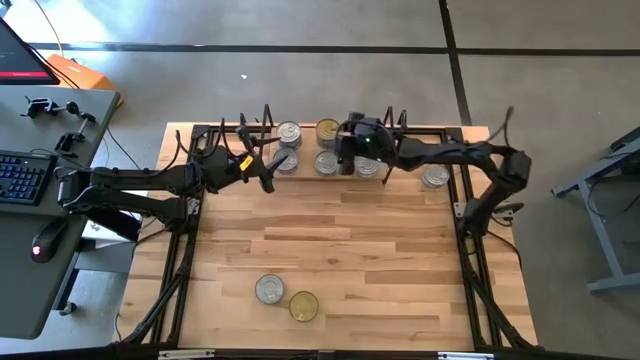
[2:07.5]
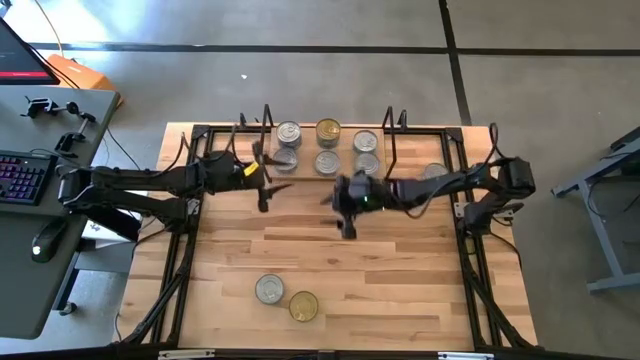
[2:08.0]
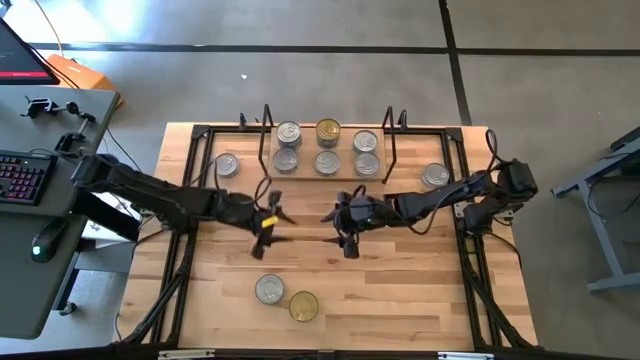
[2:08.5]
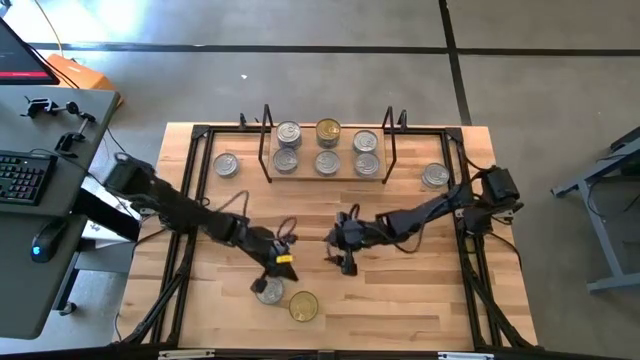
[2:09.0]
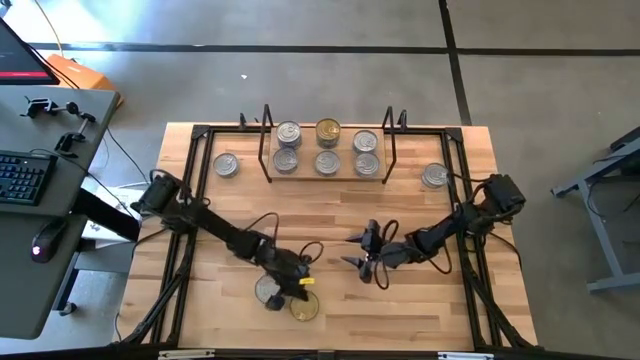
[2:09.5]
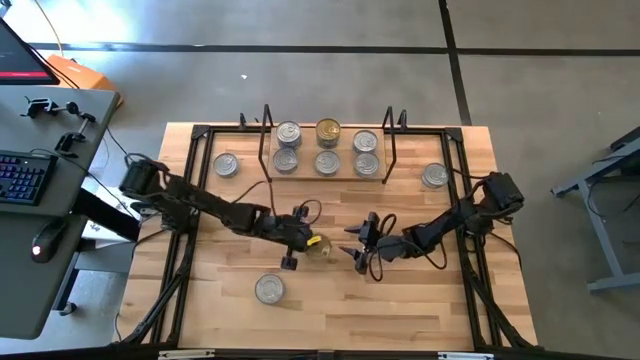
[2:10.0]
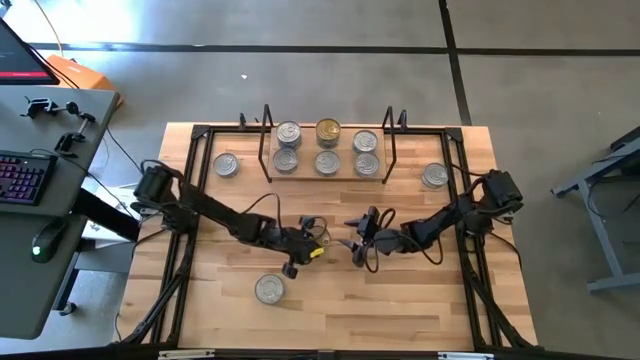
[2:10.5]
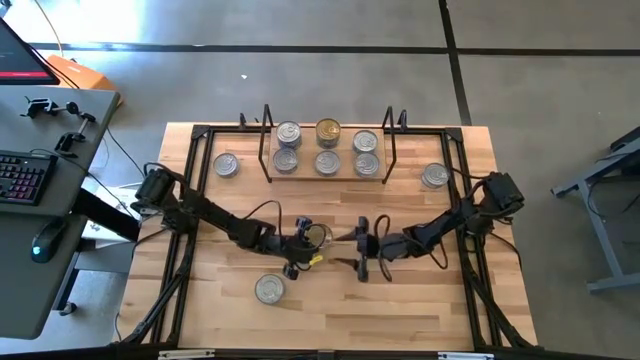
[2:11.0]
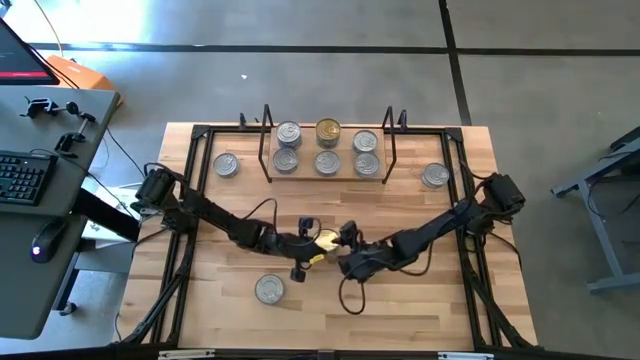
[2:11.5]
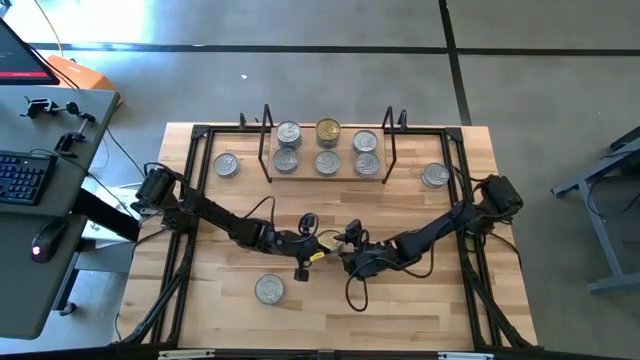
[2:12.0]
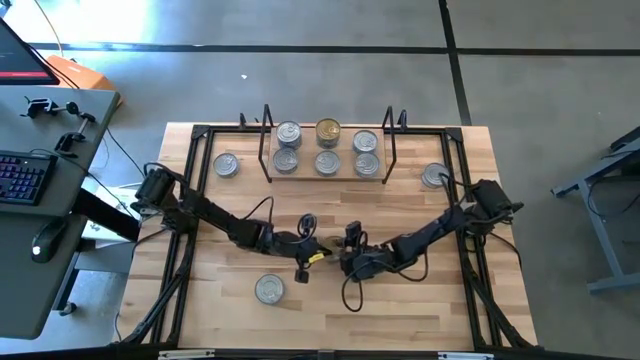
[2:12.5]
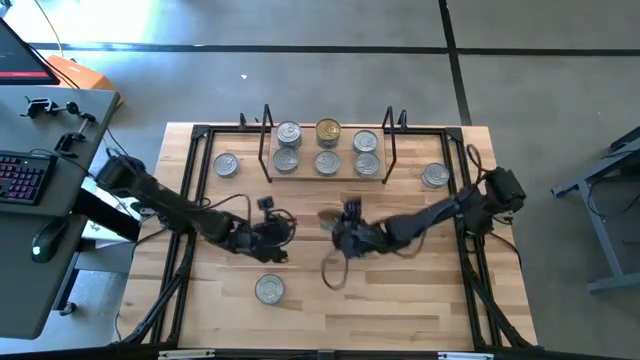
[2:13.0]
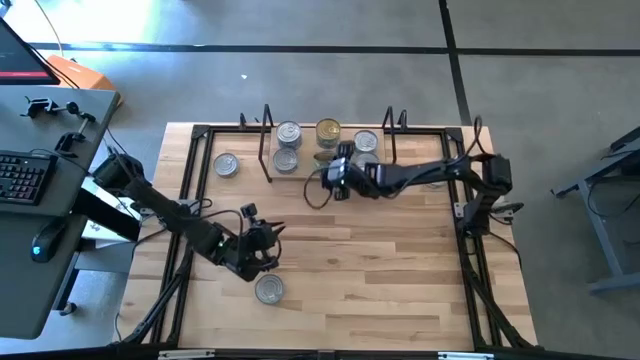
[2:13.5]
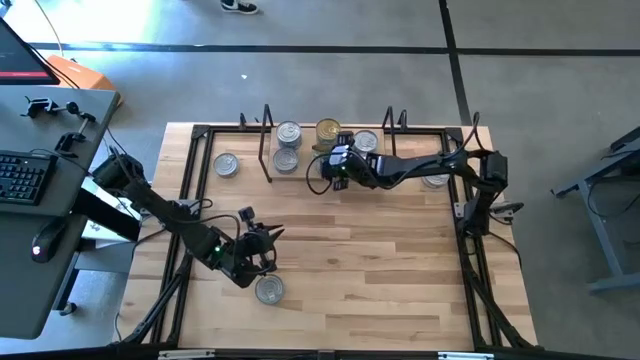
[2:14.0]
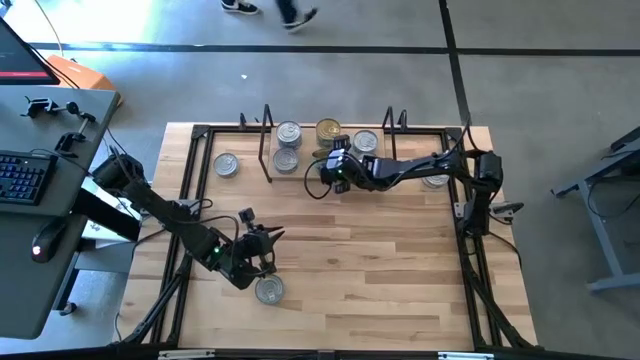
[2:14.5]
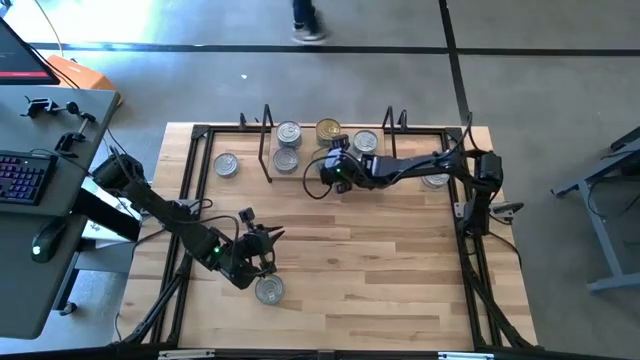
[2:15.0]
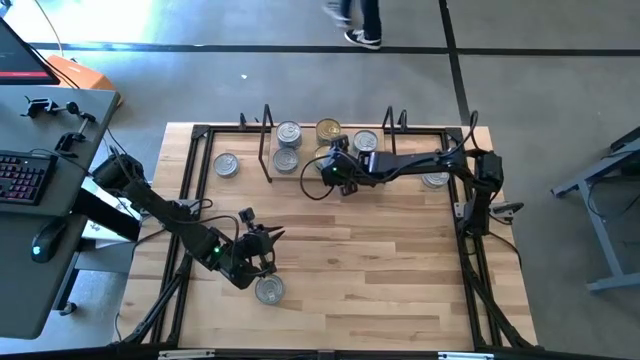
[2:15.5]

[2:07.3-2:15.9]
Task: Stack canned seafood by type on shelf
Stack the green tuna can on top of the other green tuna can on the shelf

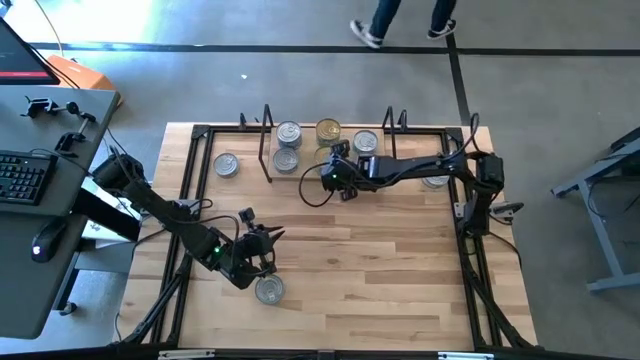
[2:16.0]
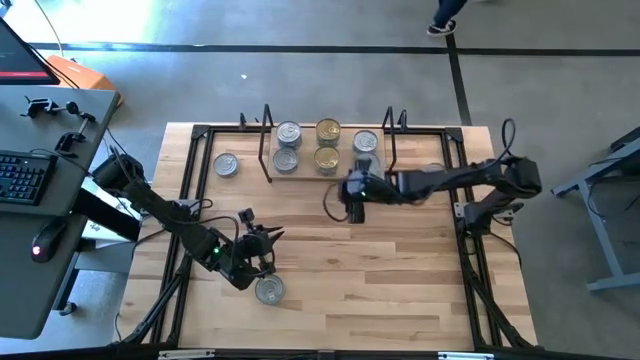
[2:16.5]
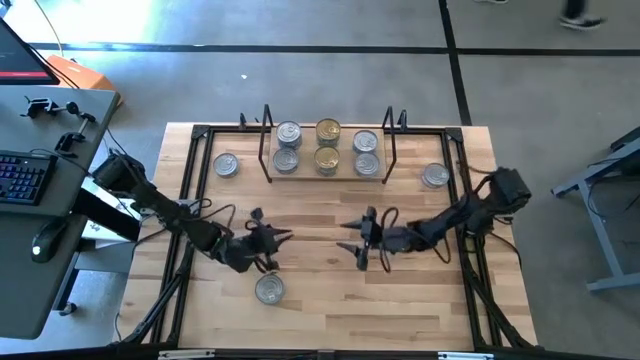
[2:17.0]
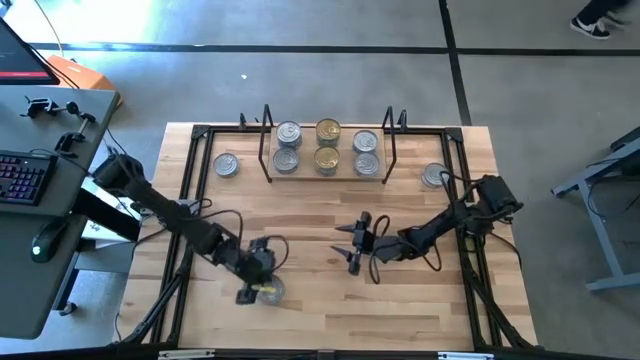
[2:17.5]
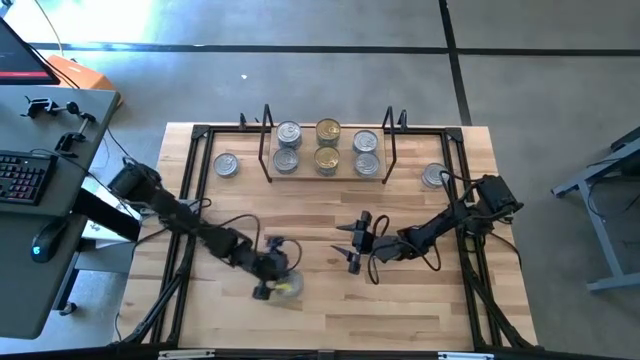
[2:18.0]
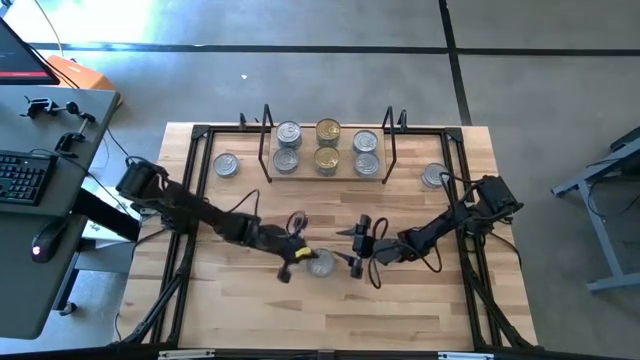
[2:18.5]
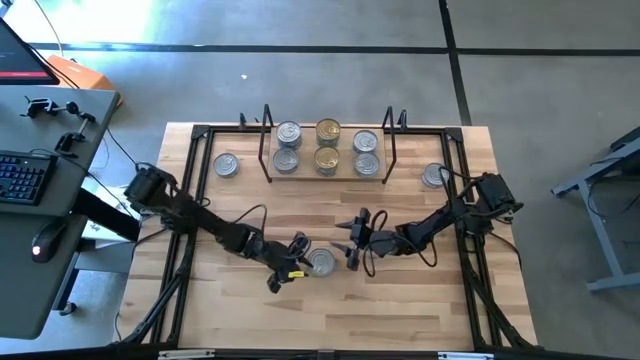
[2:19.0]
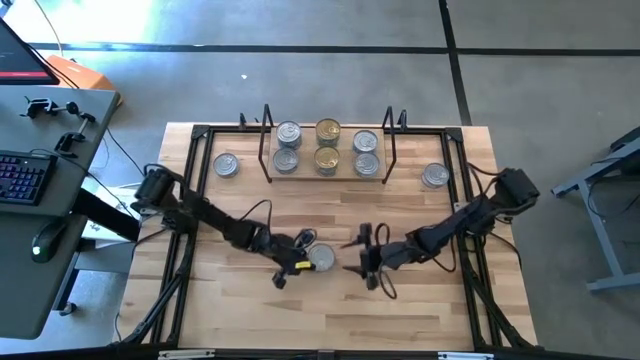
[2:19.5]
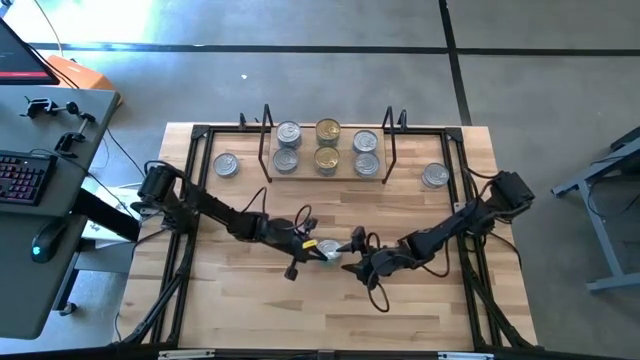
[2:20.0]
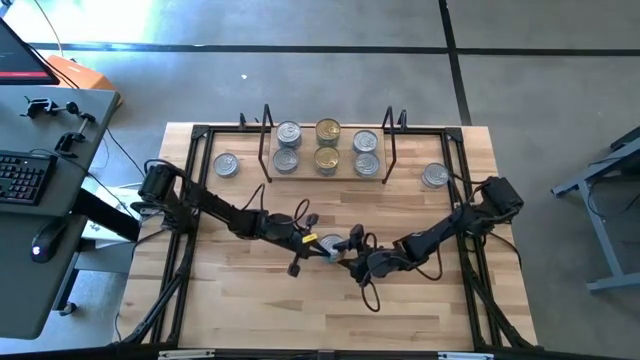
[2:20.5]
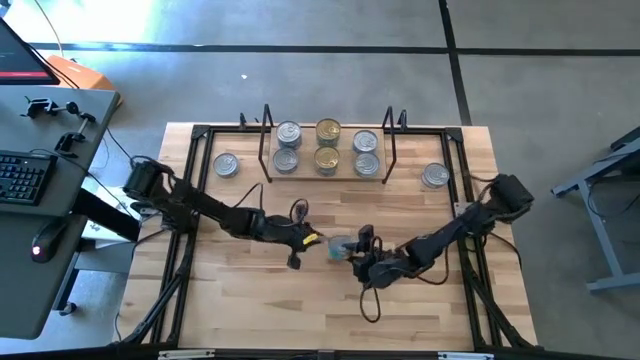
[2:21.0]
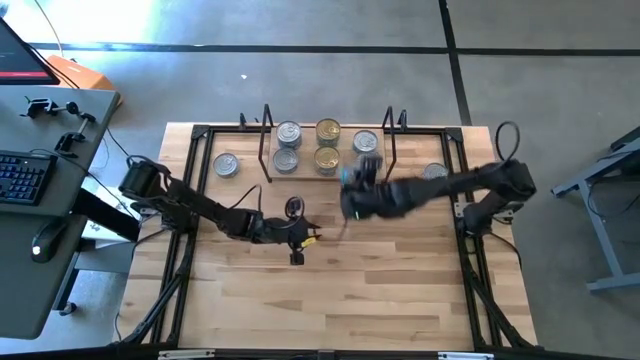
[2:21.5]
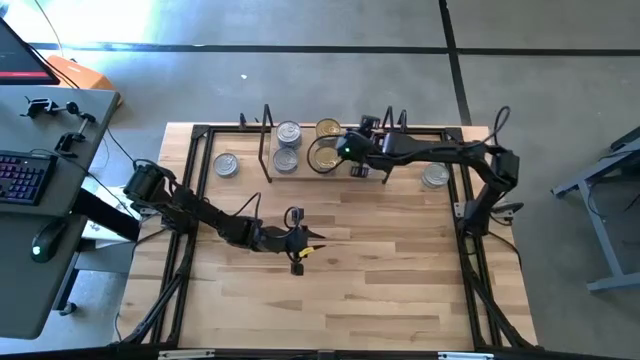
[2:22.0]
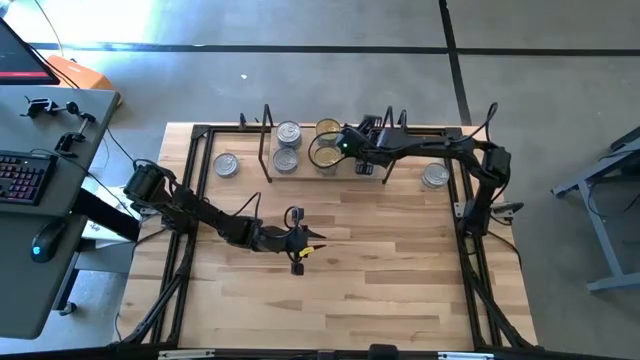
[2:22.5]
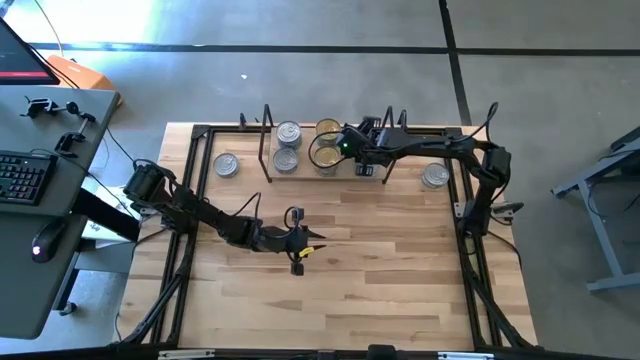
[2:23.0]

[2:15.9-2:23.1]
Stack the Green-blue tuna can on top of the other Green-blue tuna can on the shelf
